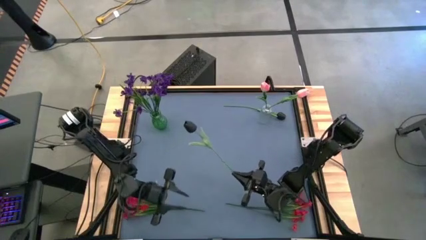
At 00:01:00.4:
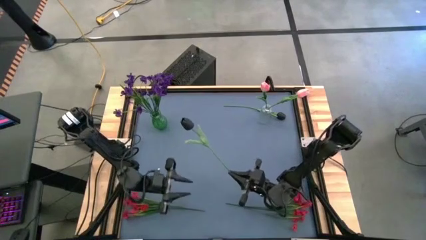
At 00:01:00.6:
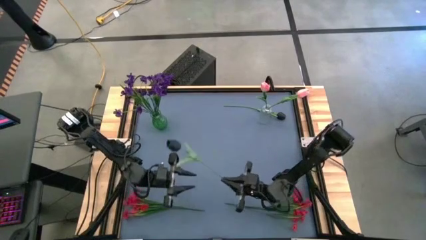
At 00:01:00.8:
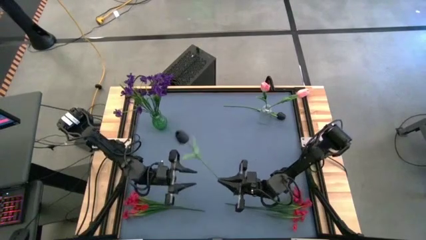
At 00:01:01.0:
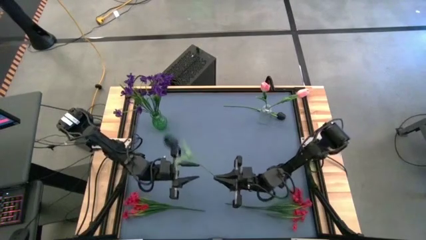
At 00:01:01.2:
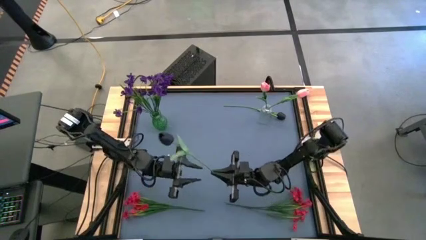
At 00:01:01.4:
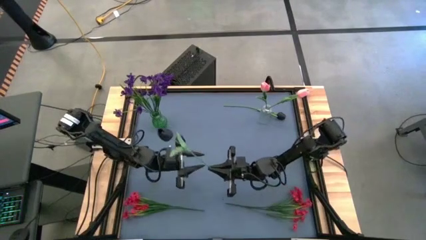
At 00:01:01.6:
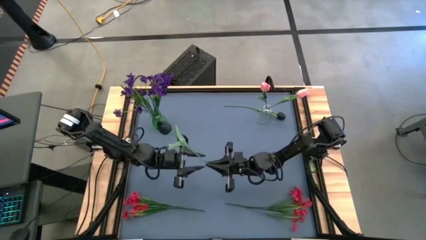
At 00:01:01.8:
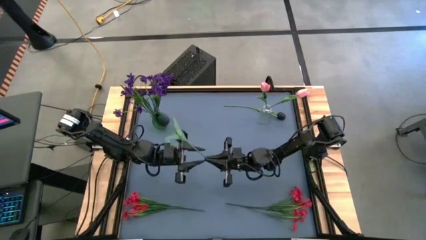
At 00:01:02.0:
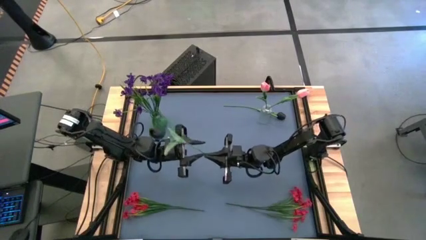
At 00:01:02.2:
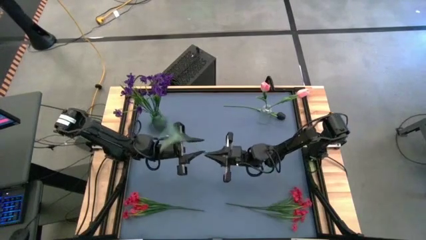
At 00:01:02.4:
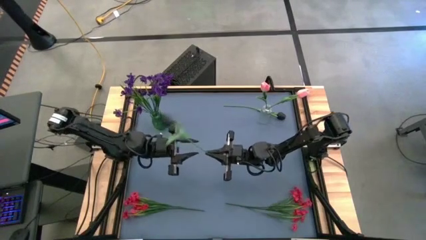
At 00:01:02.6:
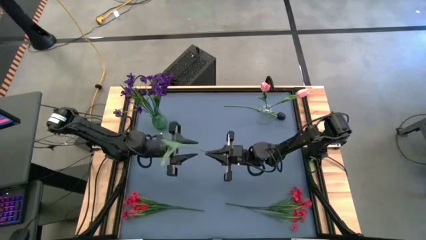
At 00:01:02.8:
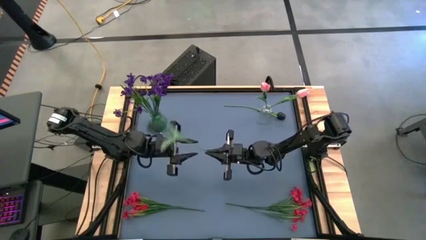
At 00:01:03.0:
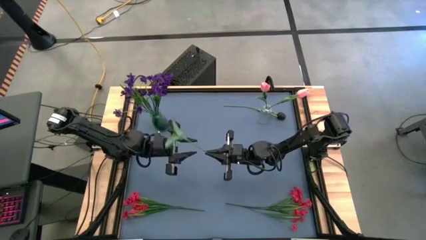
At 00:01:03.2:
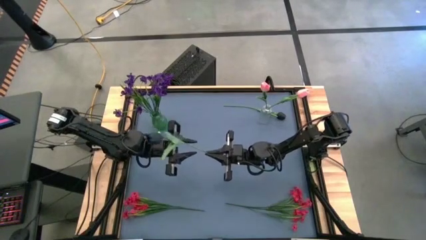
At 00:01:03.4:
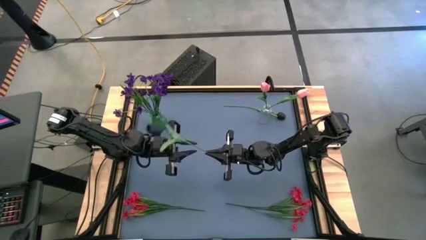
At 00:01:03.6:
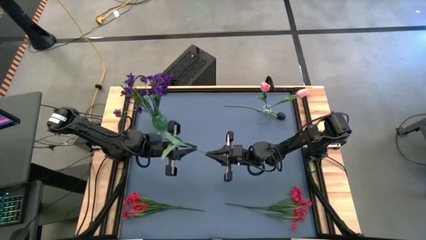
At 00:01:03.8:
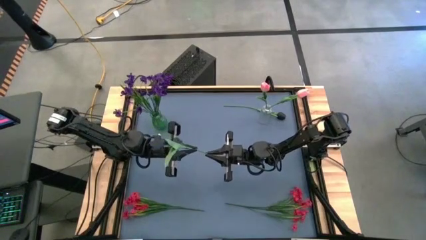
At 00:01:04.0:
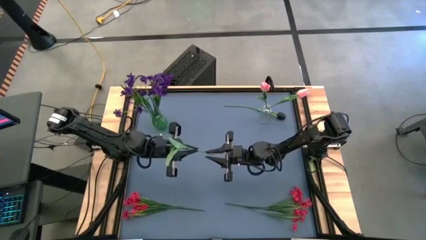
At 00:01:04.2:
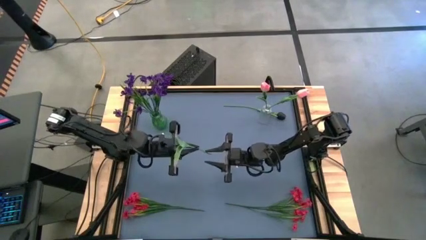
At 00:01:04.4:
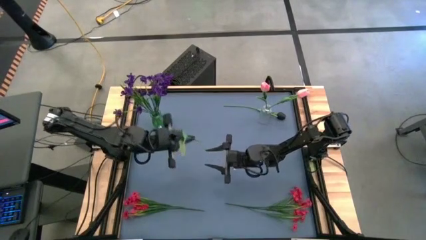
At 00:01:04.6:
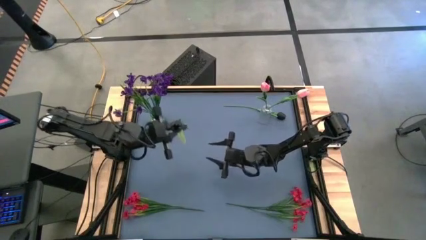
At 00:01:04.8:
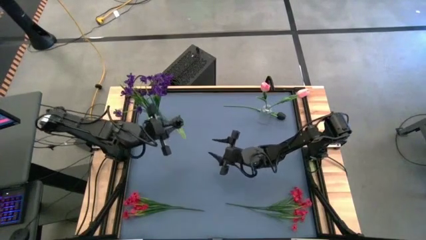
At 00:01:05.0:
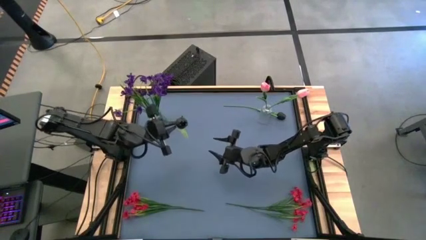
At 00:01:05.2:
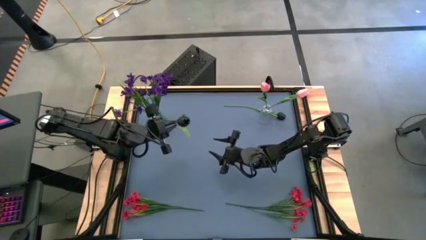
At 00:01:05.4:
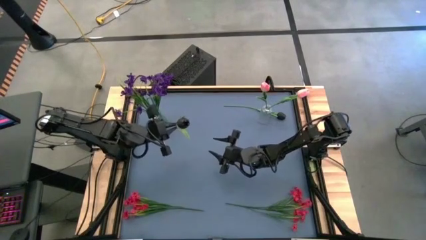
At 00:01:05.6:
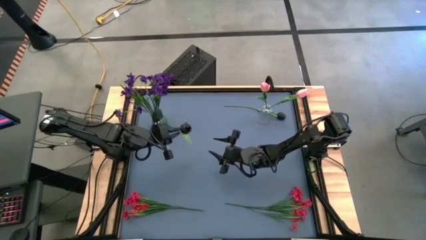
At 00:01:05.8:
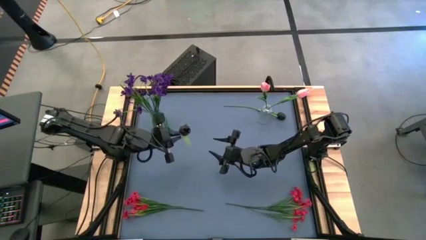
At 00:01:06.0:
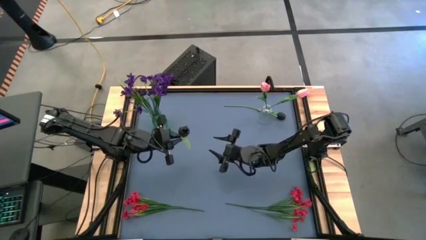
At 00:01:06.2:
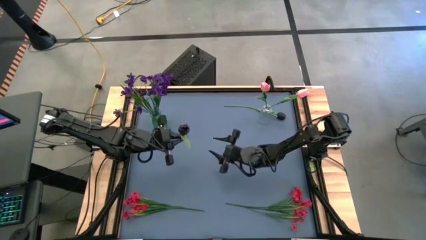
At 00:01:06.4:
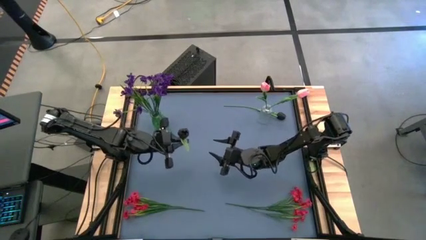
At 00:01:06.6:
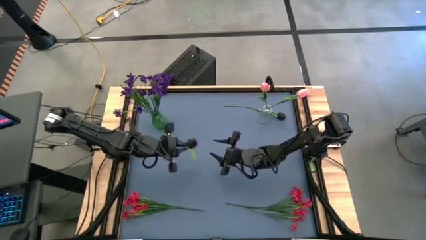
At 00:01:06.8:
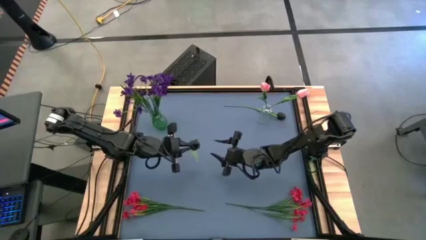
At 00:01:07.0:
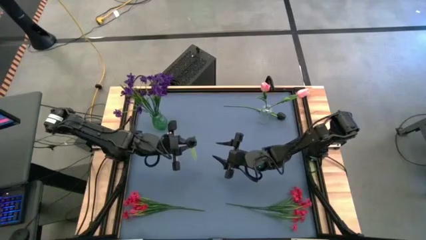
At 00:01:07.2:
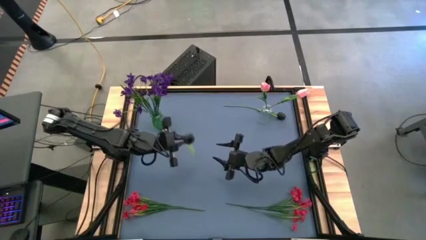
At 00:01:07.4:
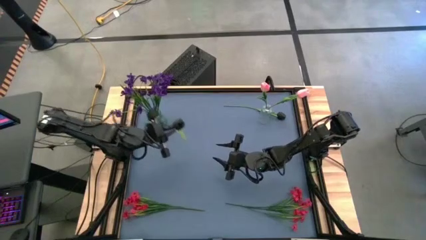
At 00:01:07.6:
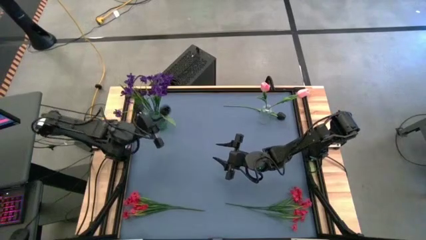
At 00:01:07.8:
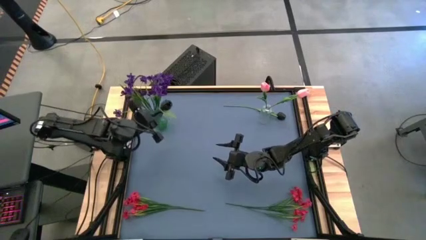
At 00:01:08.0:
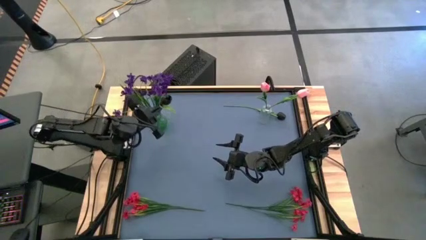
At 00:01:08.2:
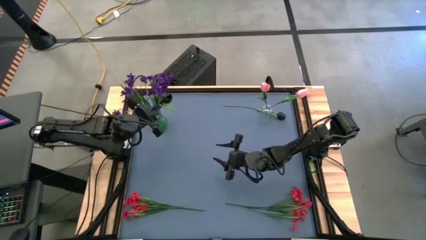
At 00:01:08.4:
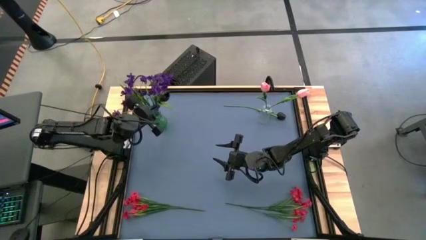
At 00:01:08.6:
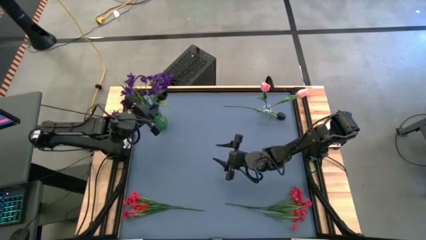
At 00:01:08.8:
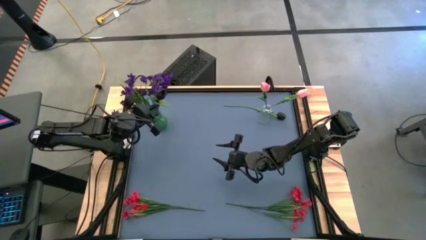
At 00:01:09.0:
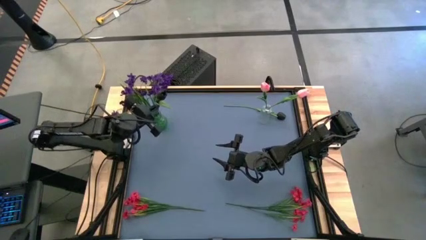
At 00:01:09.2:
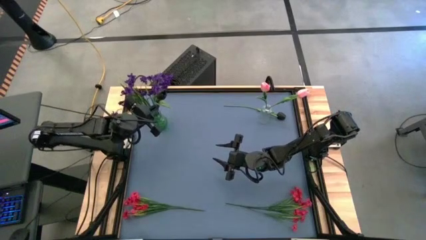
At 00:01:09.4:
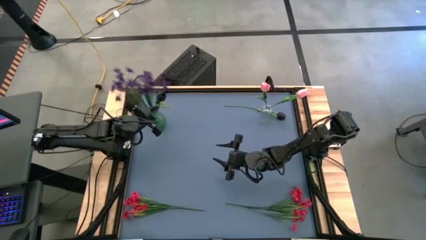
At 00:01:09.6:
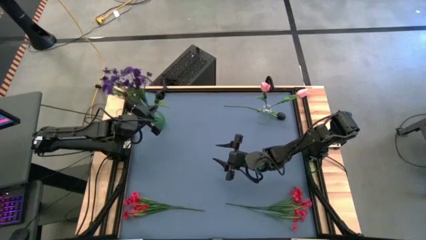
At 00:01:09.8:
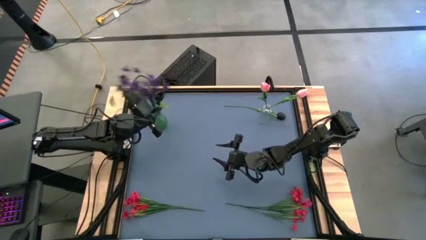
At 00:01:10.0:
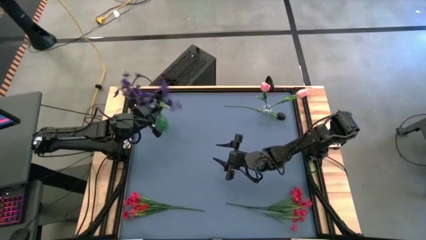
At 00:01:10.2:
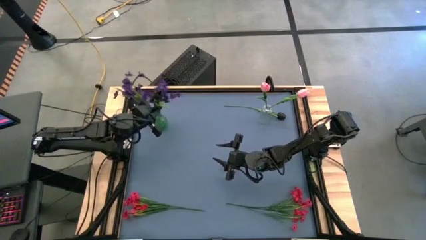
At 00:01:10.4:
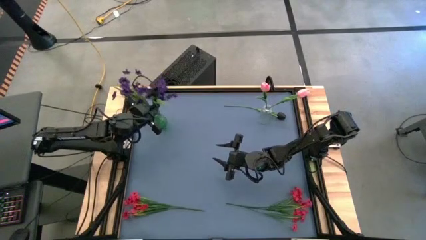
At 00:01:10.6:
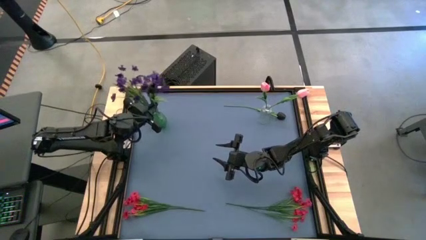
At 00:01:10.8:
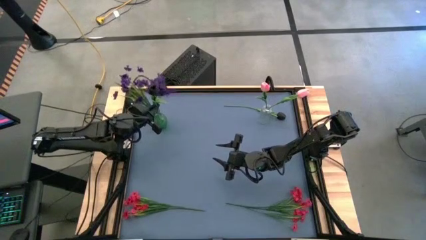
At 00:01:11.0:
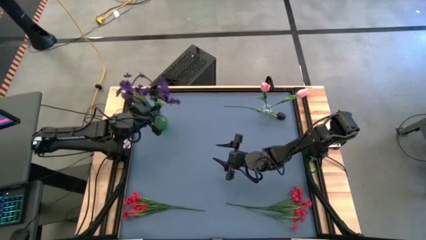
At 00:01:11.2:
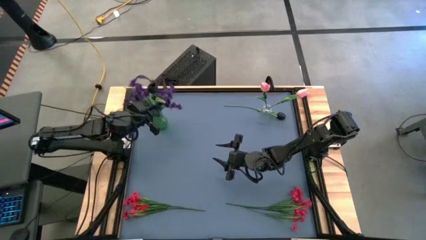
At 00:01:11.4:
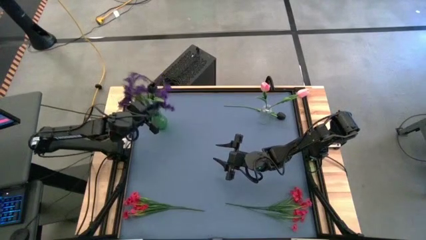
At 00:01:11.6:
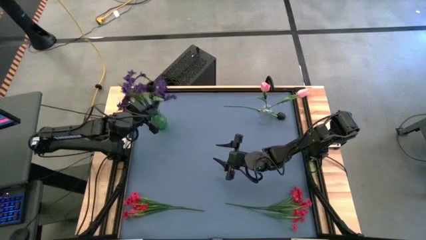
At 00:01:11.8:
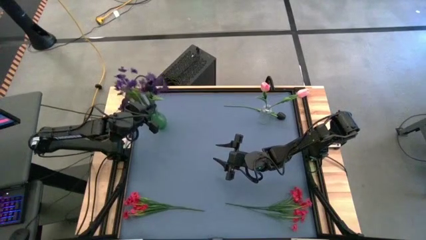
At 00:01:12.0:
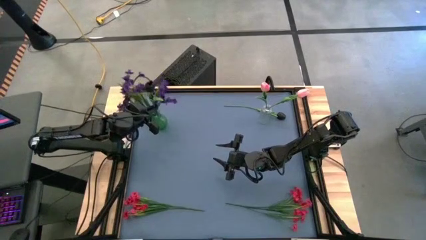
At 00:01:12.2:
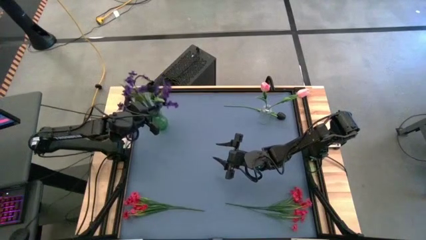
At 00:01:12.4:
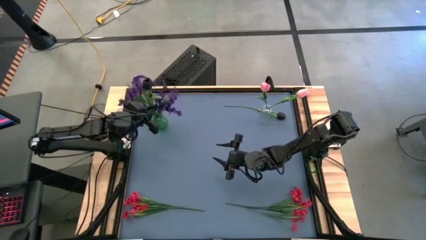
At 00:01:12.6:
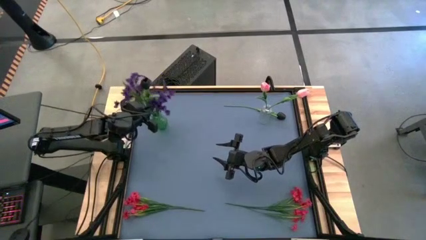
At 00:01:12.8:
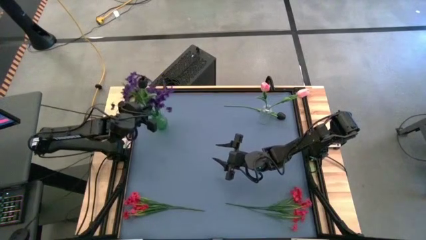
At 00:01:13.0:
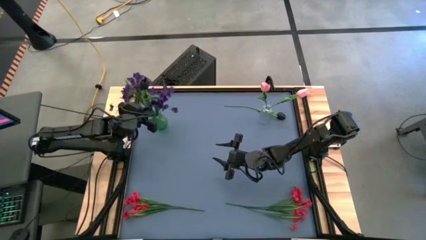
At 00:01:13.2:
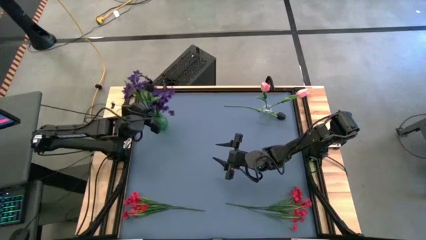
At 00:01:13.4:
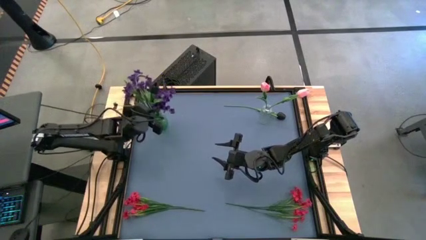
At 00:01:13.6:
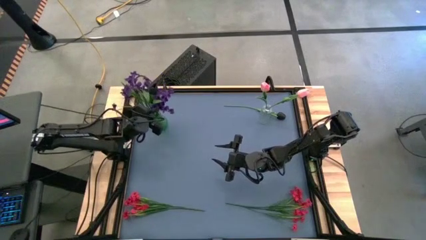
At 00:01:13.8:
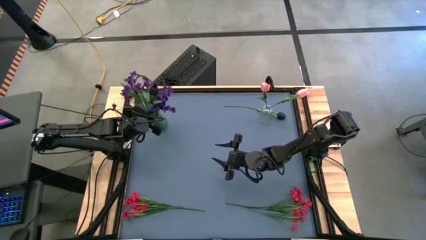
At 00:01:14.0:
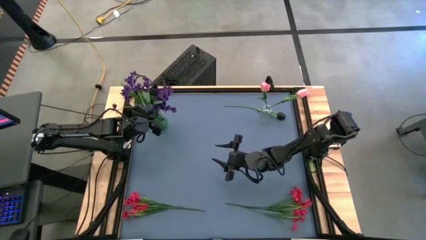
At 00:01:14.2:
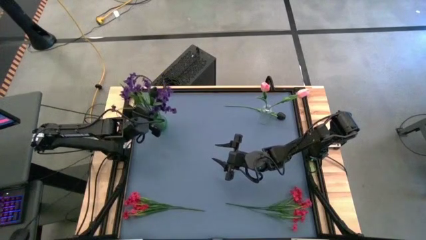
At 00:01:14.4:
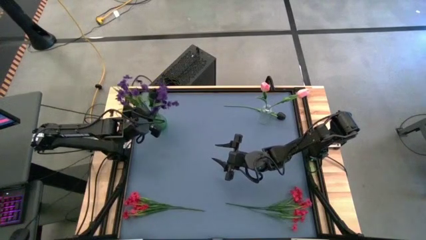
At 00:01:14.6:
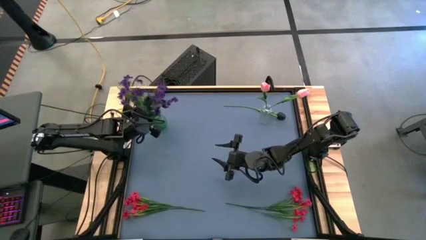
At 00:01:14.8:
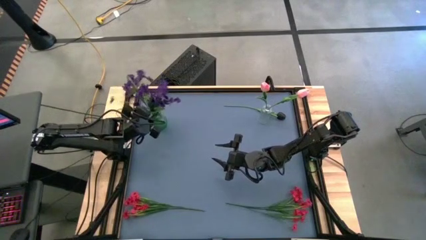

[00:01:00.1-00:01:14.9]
Task: Sort flowers into vase by color
Put the left black flower into the green vase
